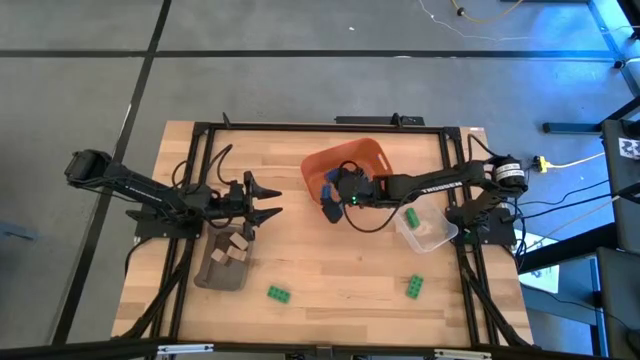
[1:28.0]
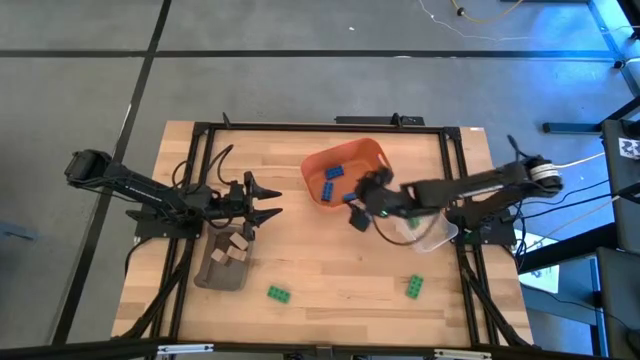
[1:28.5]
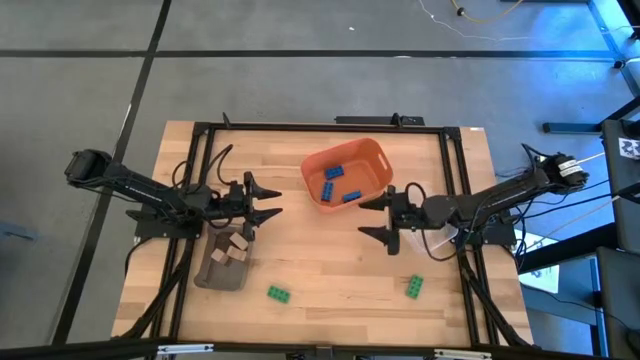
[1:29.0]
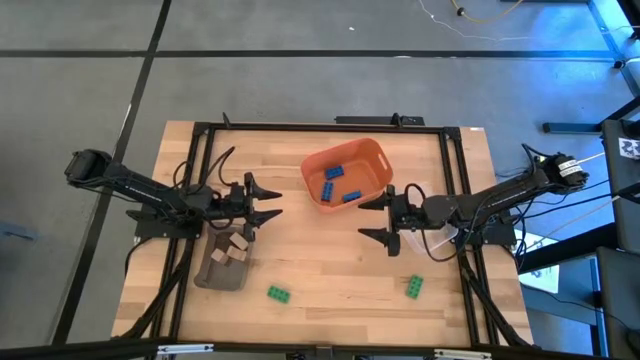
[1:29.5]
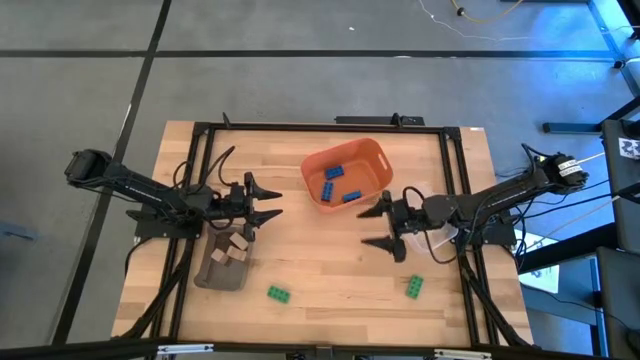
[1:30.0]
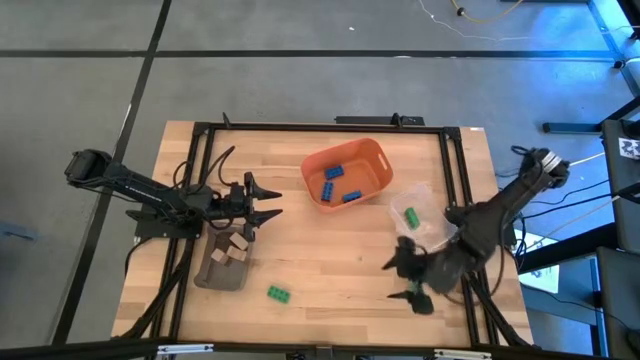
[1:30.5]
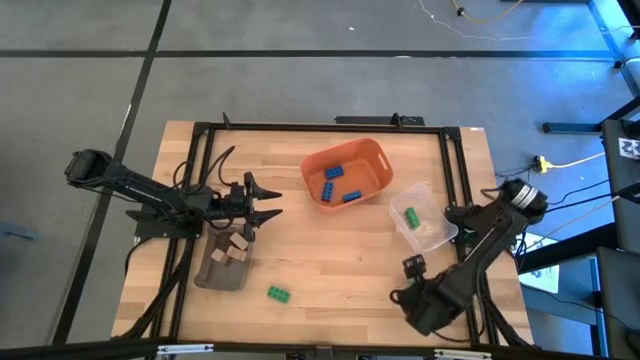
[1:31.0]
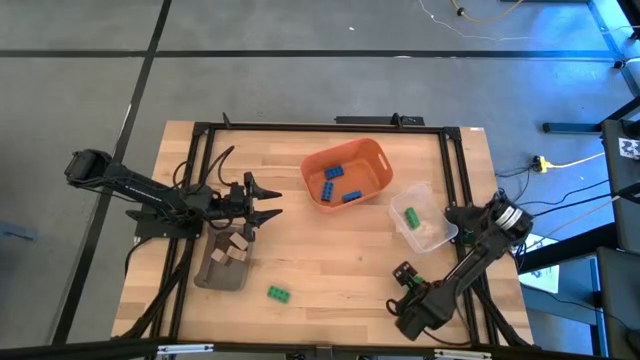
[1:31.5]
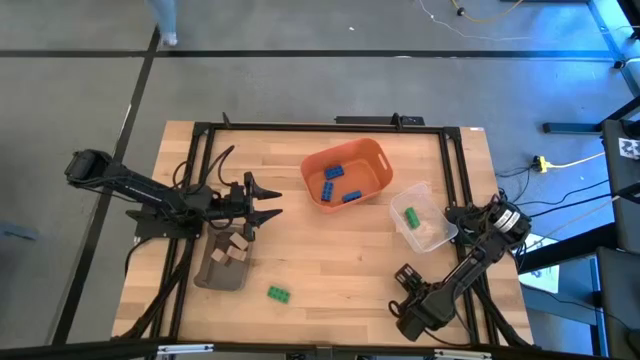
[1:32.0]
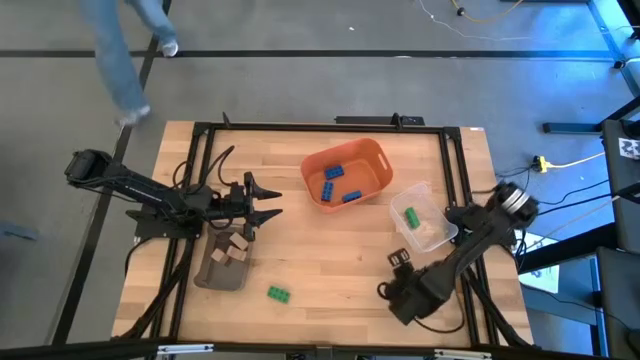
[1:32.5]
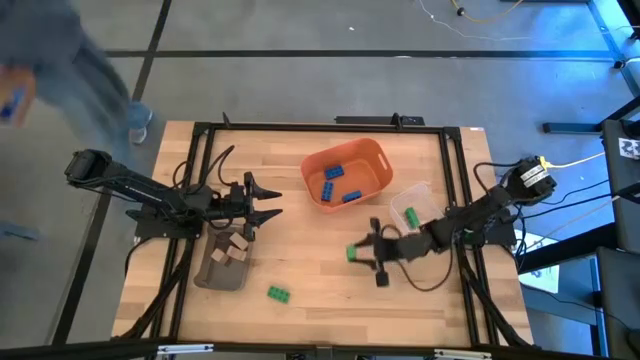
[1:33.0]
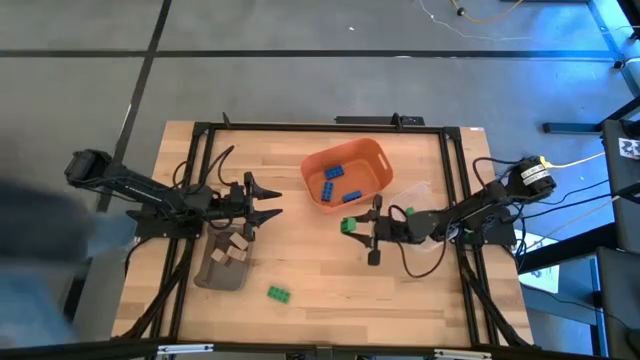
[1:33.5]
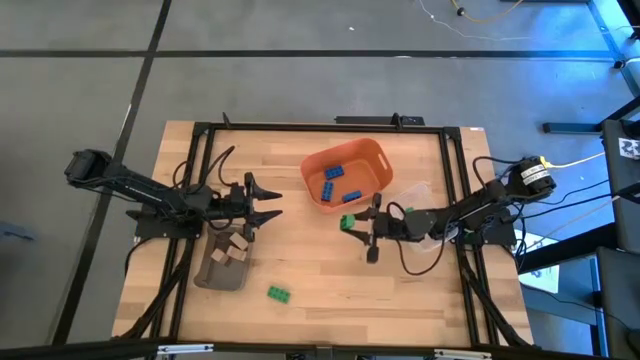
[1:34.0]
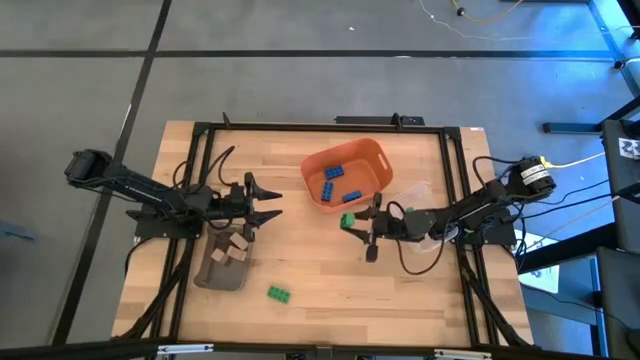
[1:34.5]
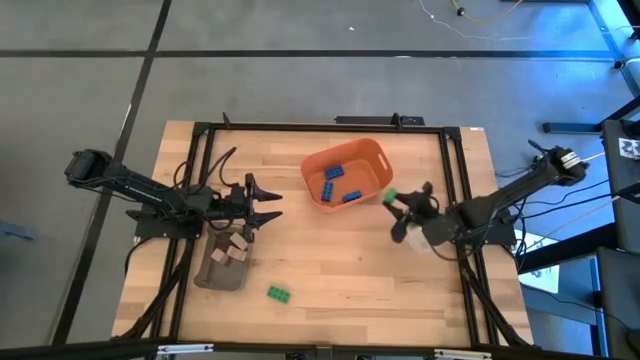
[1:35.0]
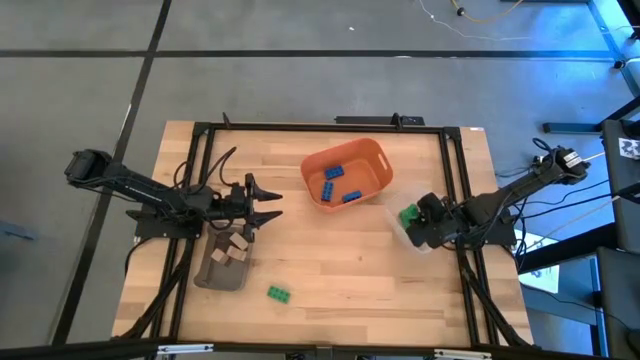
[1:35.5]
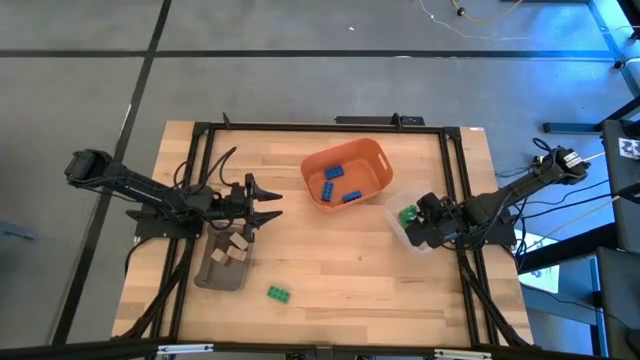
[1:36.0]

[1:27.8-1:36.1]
Task: Sort & place blocks by color
Put the right green game piece into the transparent bin

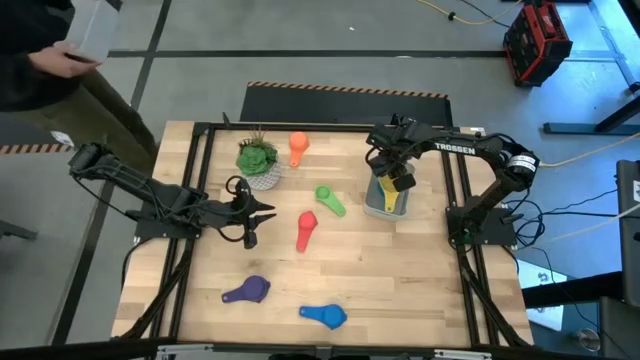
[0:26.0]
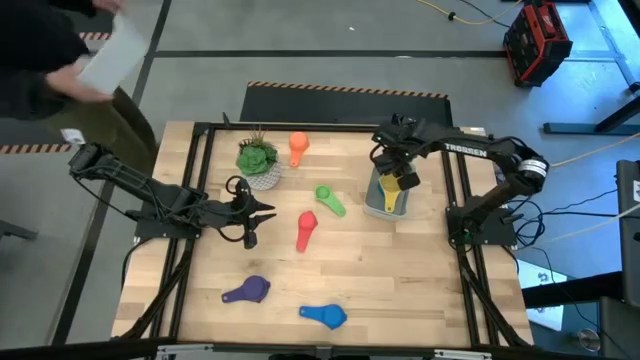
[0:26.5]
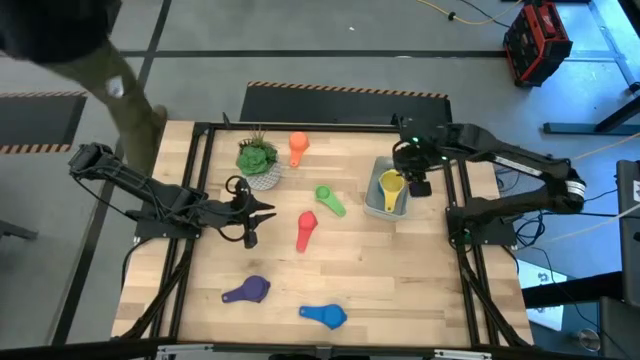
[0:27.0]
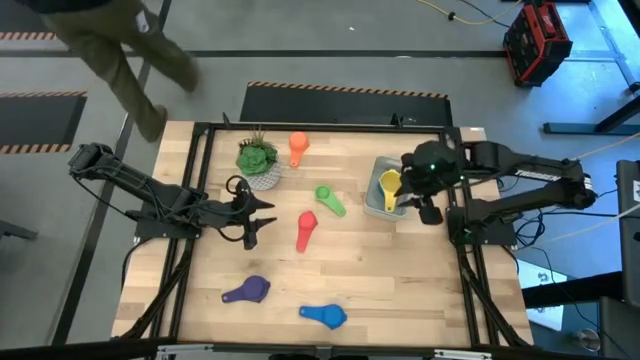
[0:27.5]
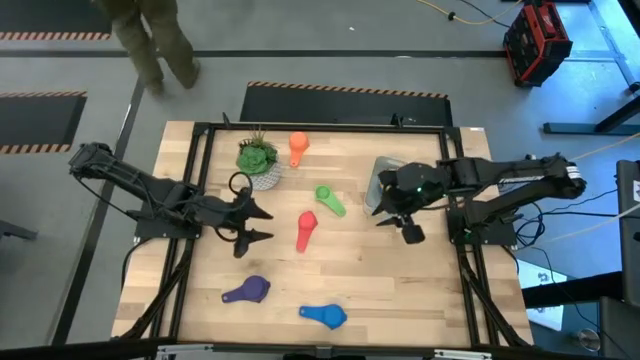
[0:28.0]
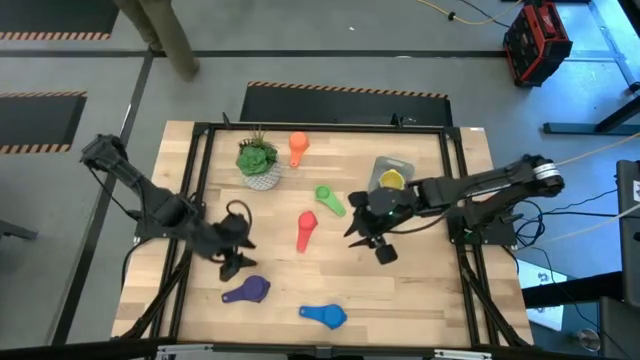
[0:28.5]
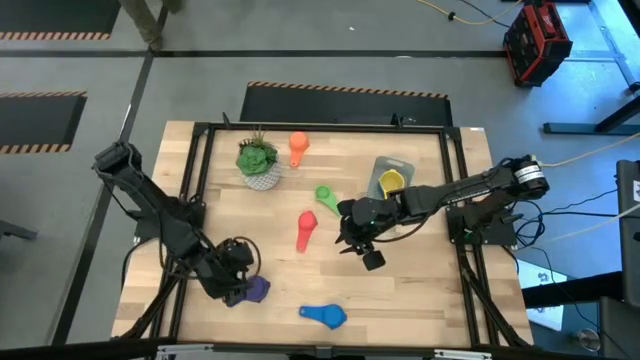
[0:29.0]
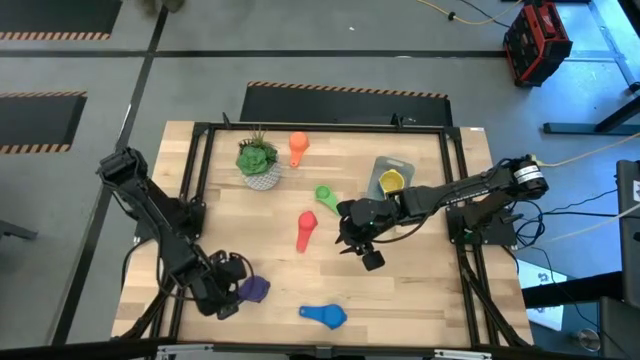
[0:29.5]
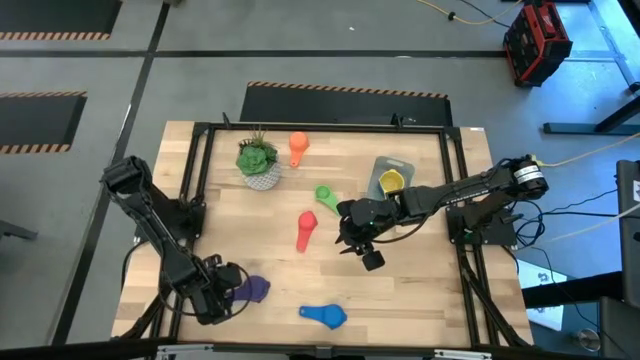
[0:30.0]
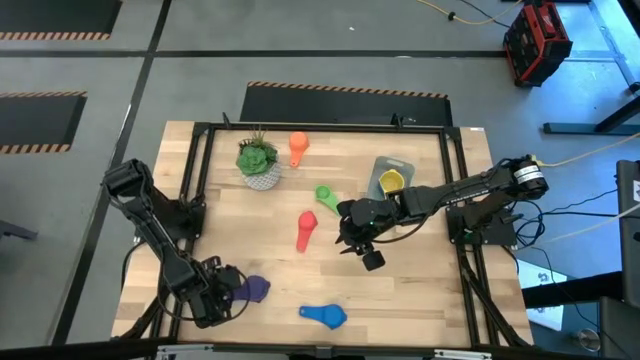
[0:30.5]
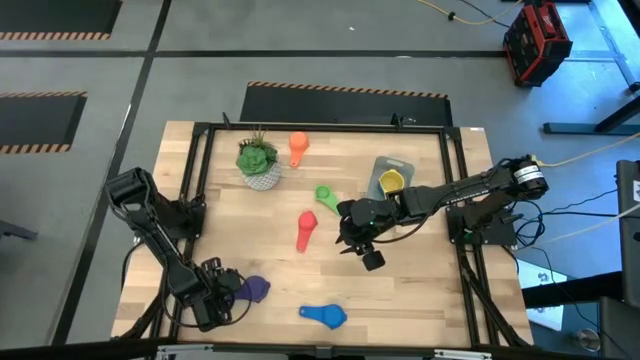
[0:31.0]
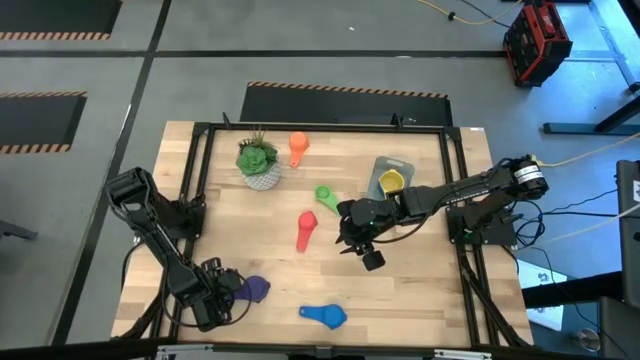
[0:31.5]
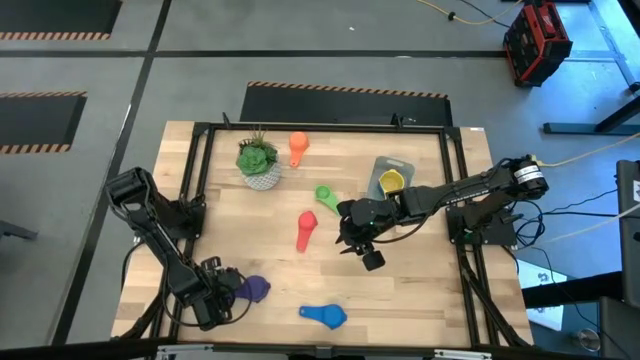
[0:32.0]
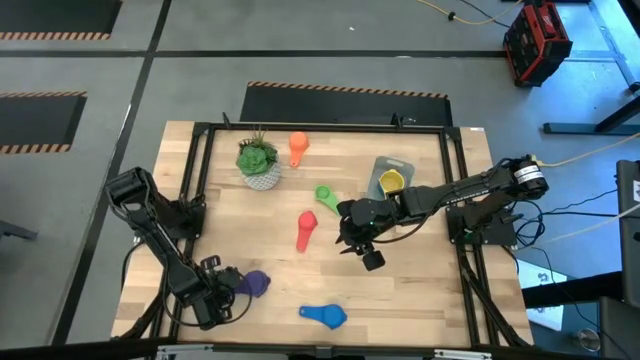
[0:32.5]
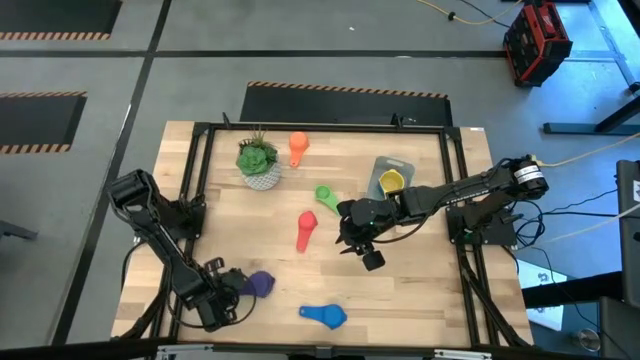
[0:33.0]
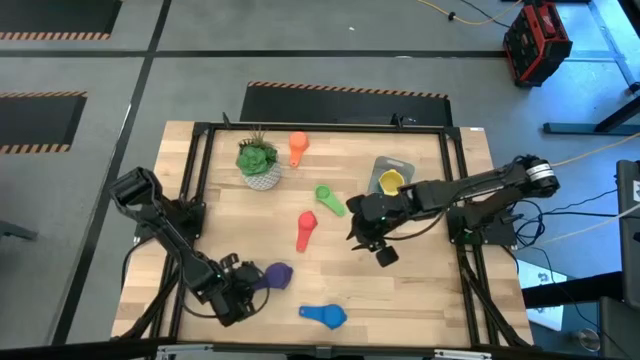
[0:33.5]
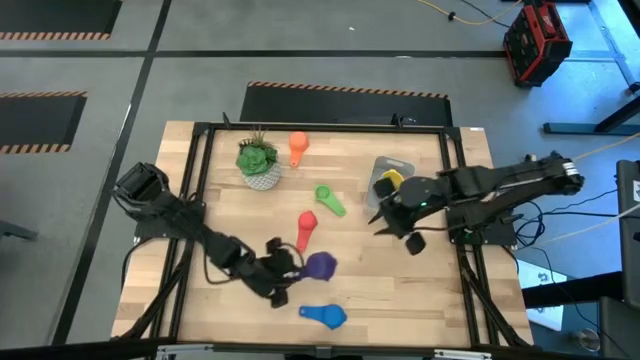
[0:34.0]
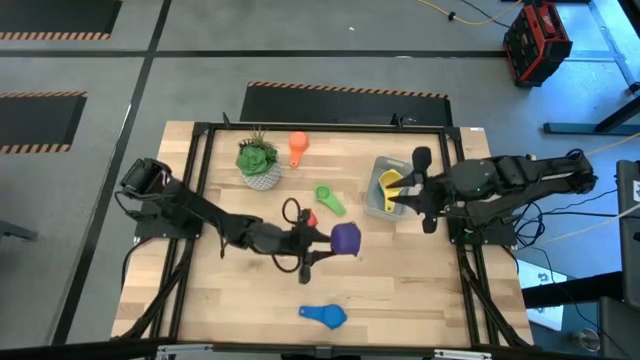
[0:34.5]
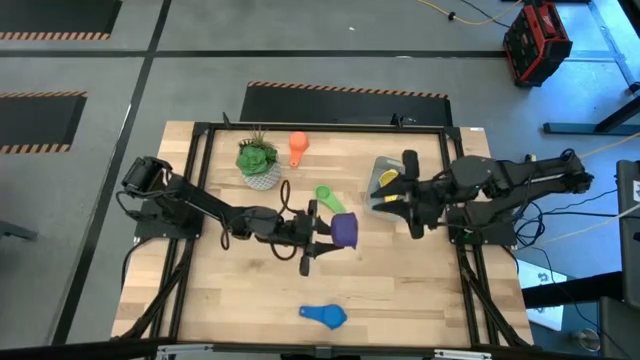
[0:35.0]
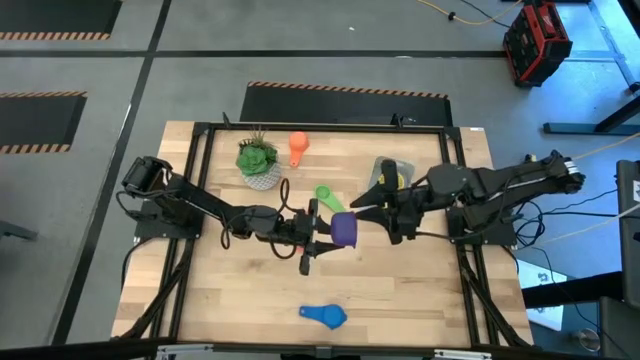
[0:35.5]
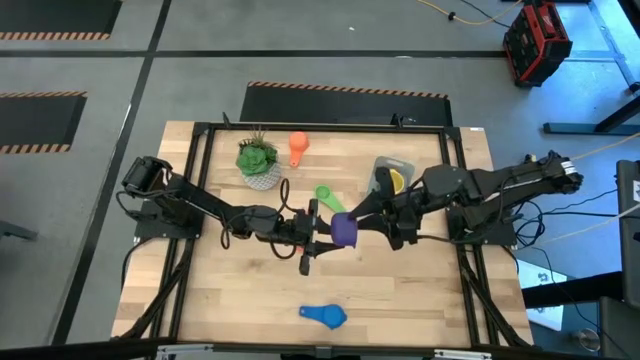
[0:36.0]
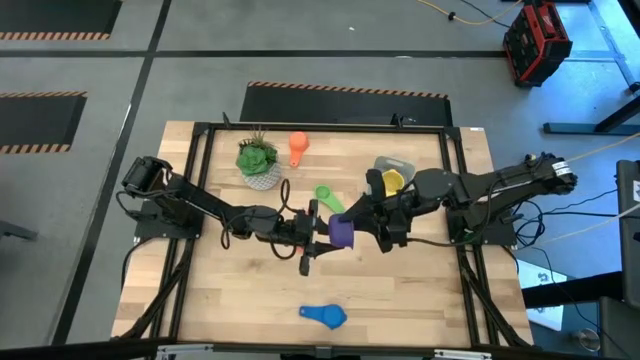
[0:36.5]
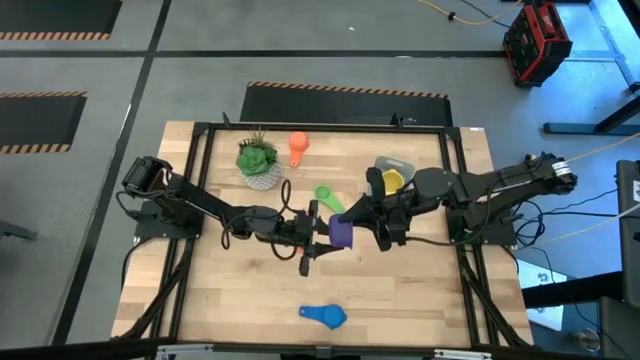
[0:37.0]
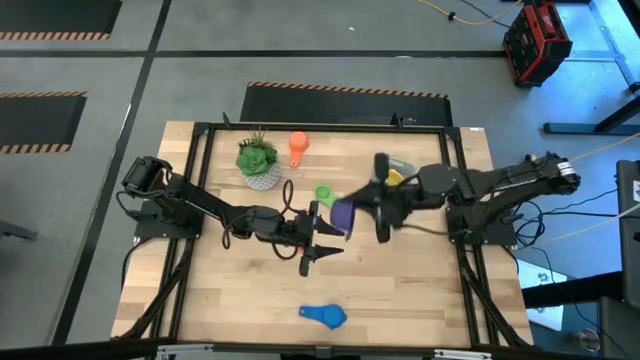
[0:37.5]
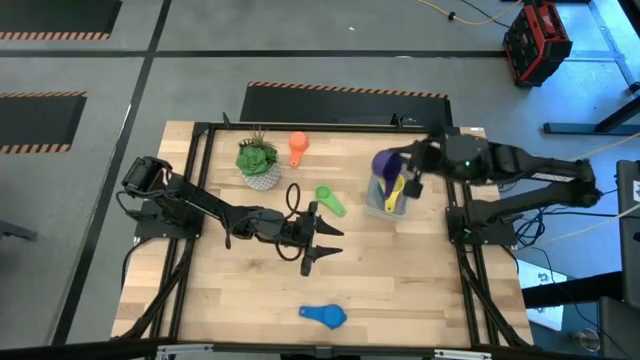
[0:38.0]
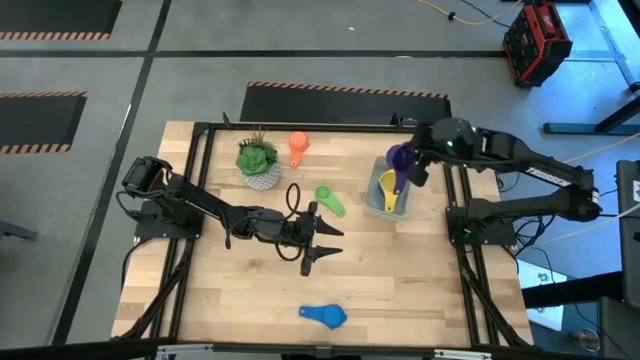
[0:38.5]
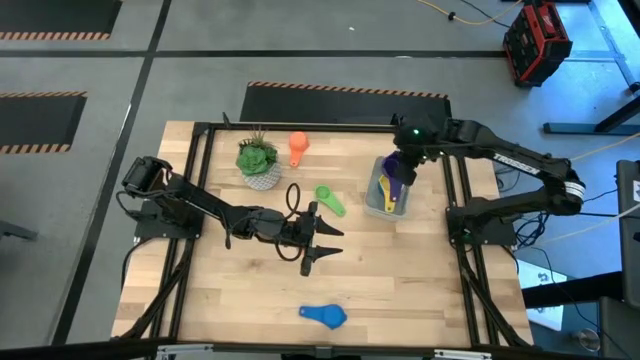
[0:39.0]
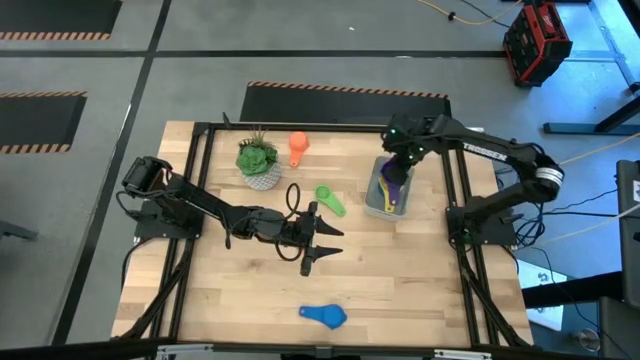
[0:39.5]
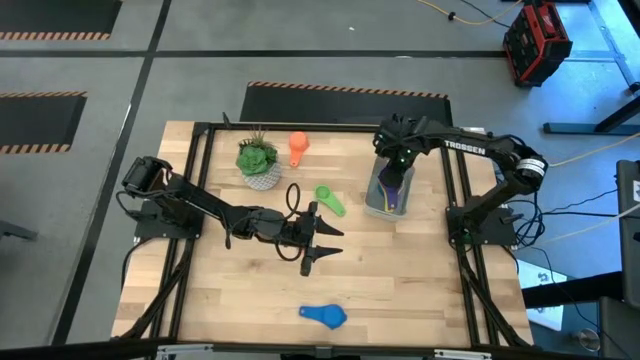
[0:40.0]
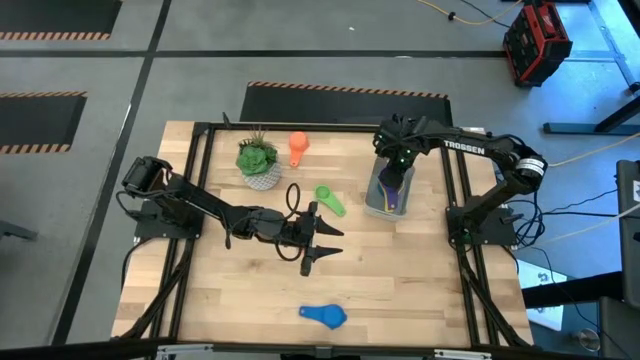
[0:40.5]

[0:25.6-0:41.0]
Task: Nest measuring cups in basket
Stack the violet measuring cup on top of the yellow measuring cup in the gray bin
